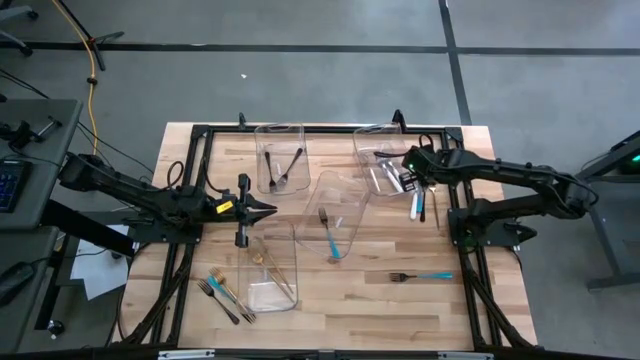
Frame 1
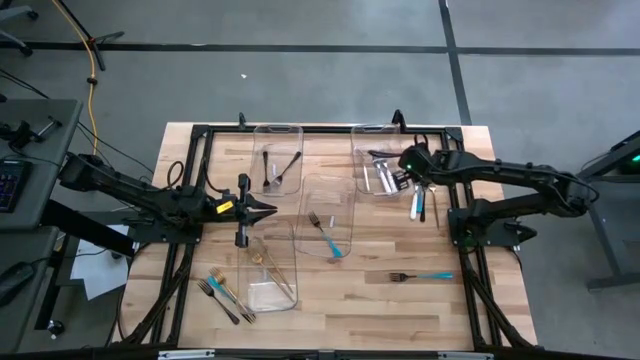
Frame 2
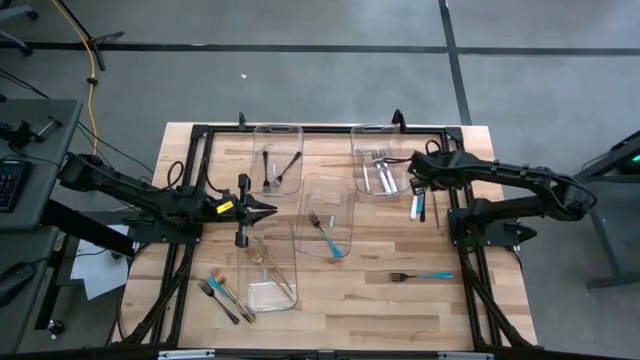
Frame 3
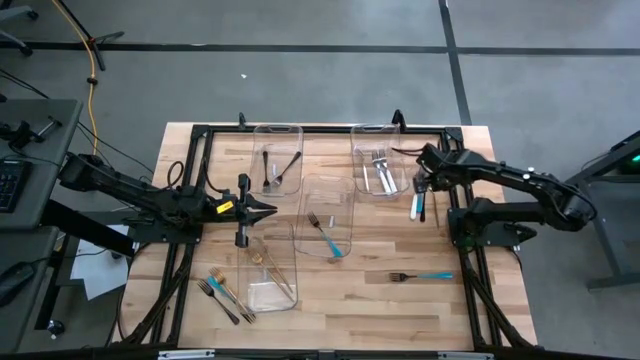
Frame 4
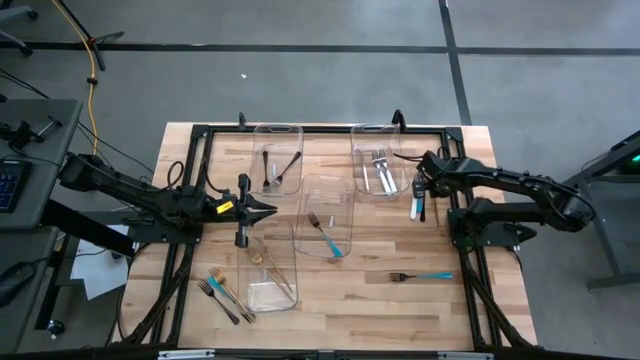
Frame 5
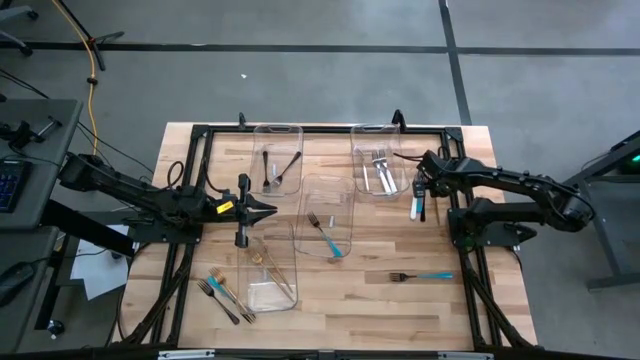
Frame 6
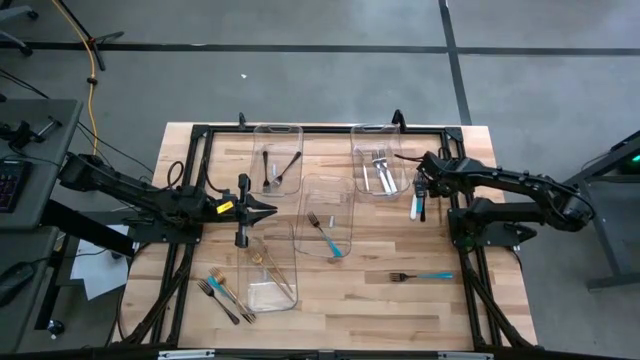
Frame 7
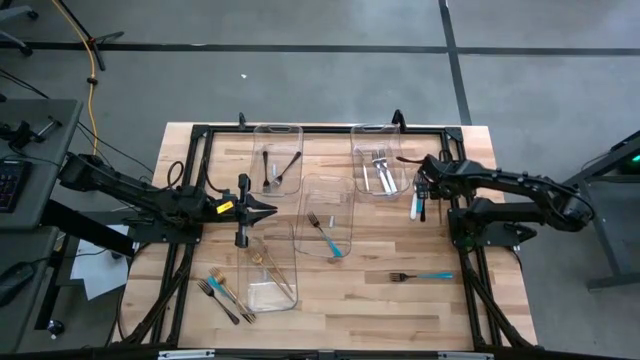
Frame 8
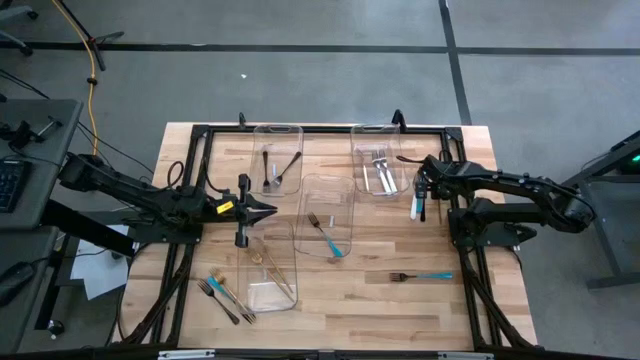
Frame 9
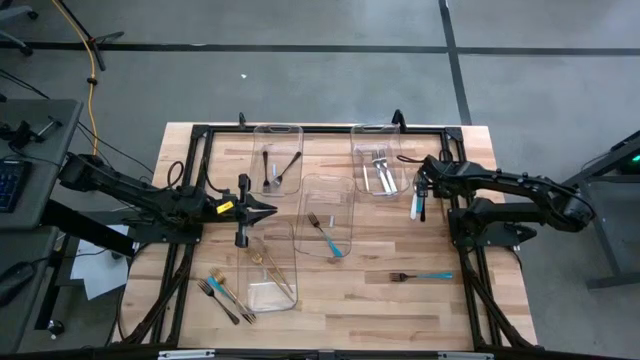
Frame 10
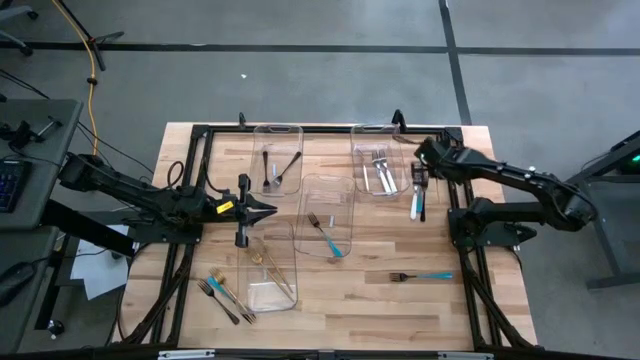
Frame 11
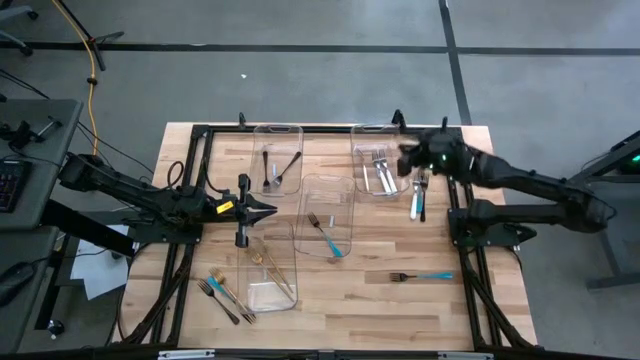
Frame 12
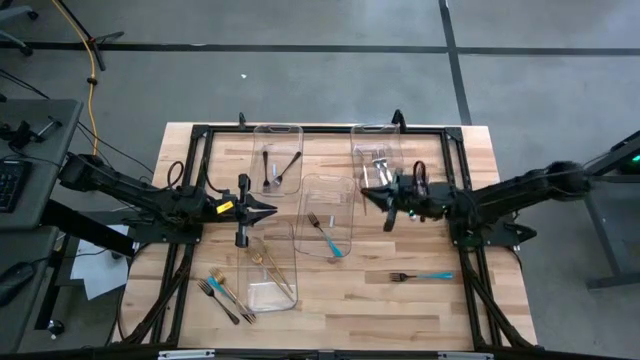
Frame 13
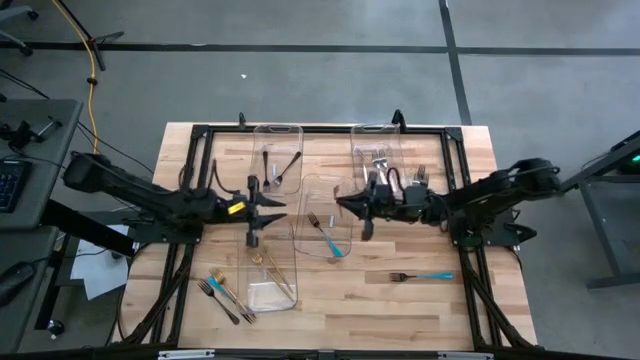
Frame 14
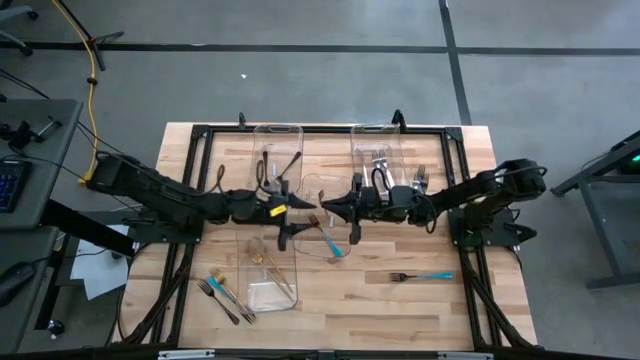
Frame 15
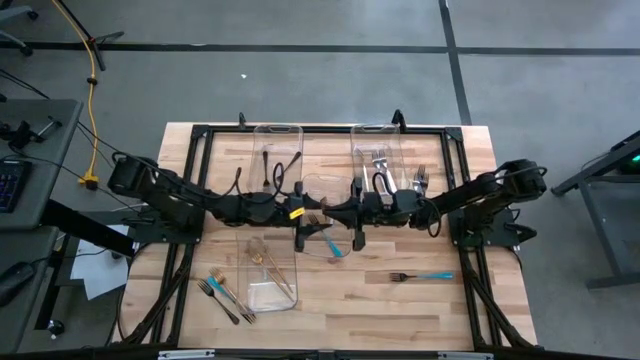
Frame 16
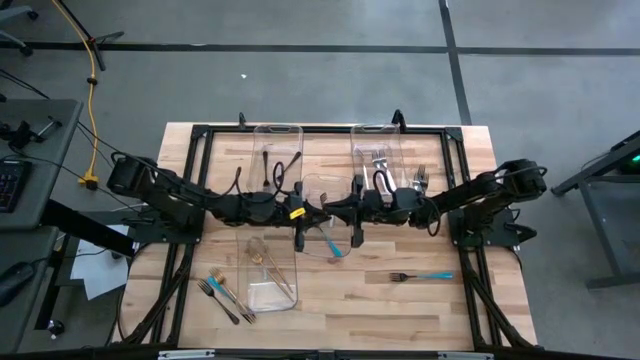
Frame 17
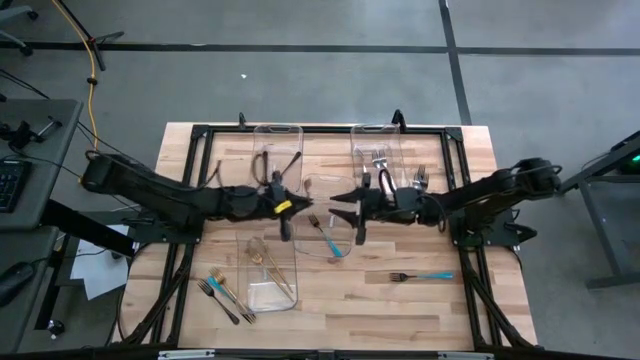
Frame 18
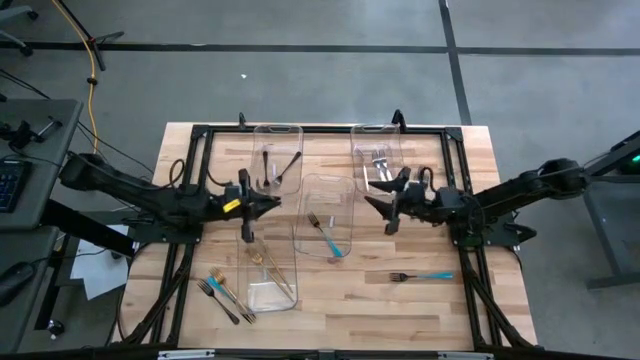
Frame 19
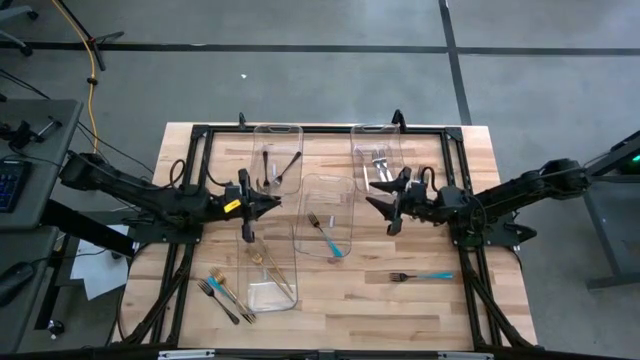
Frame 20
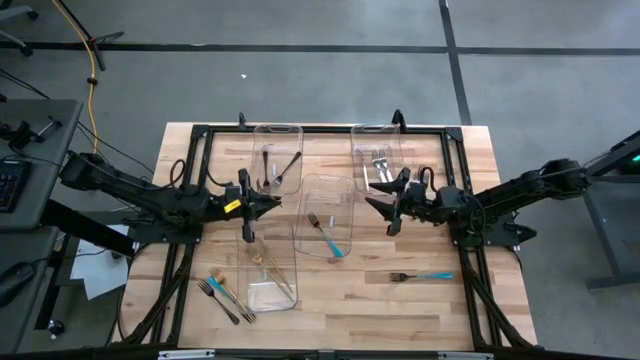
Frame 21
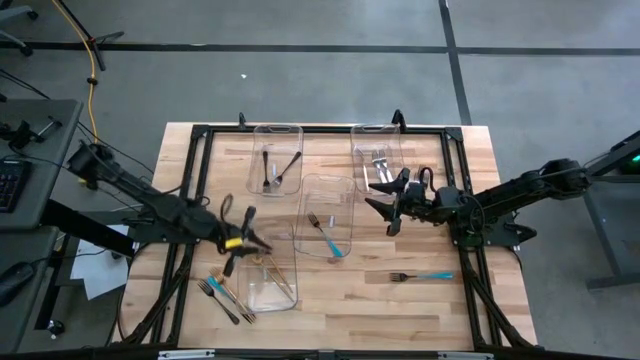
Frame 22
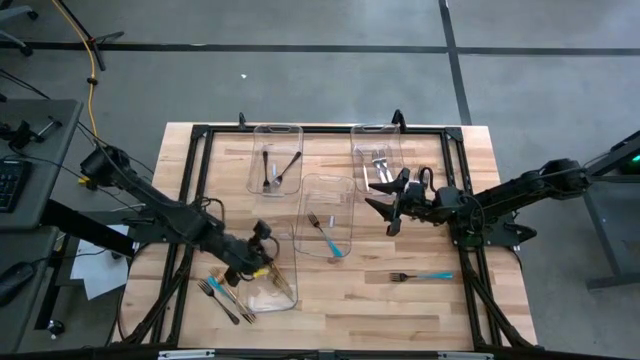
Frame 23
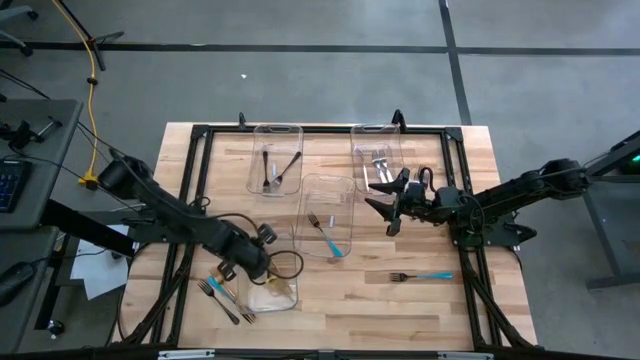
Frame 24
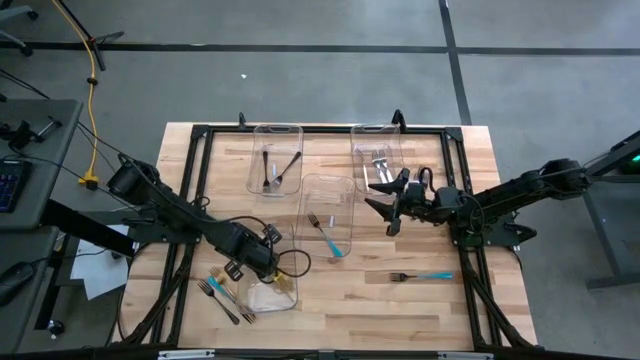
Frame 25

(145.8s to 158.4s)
Task: Sort silverware by color (type)
Put the gold fork into the bottom left transparent bin

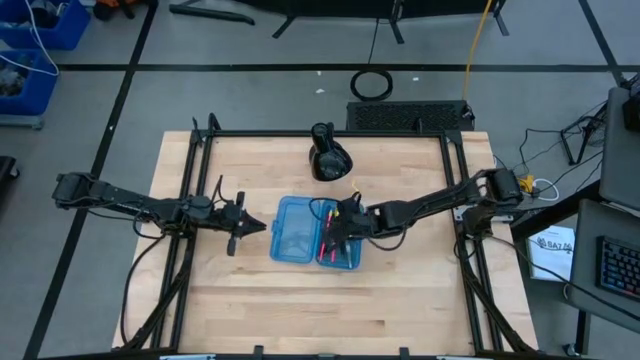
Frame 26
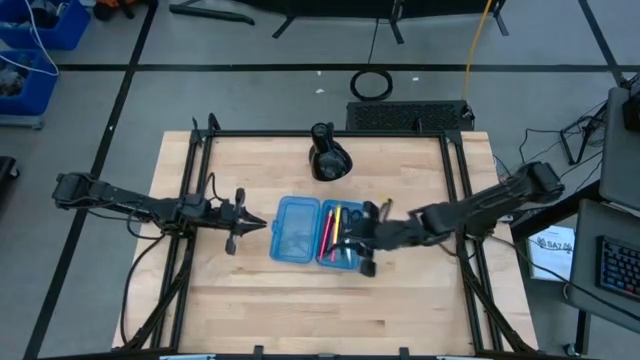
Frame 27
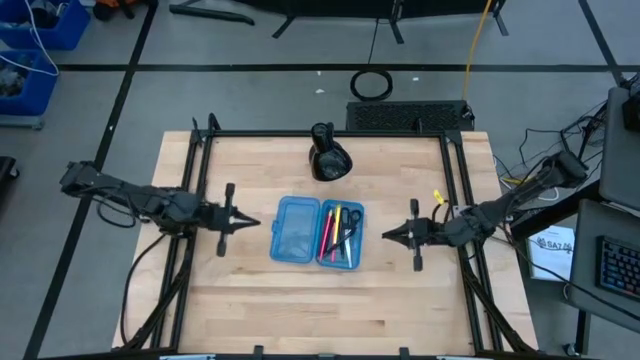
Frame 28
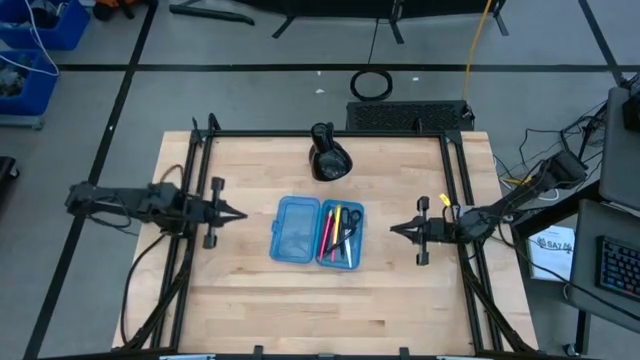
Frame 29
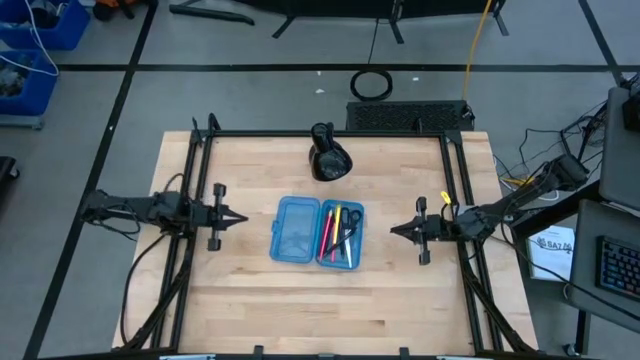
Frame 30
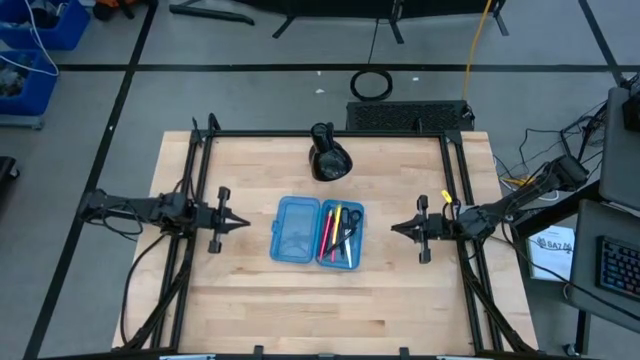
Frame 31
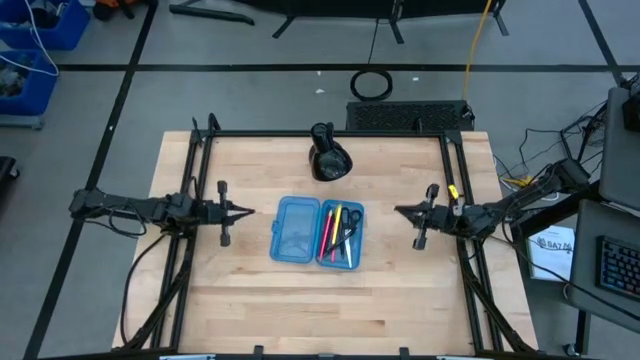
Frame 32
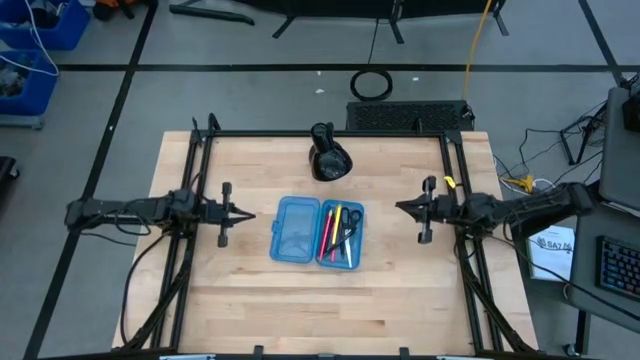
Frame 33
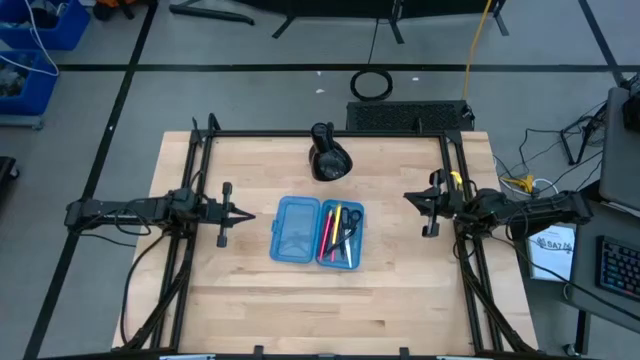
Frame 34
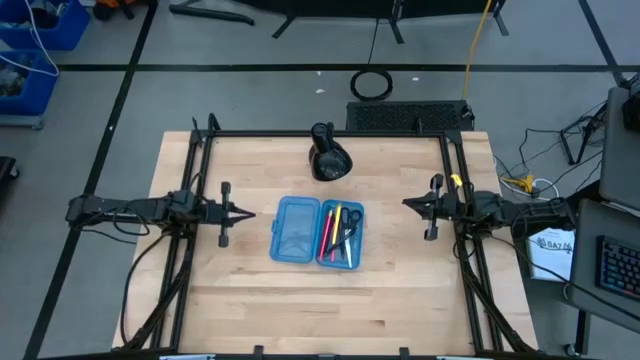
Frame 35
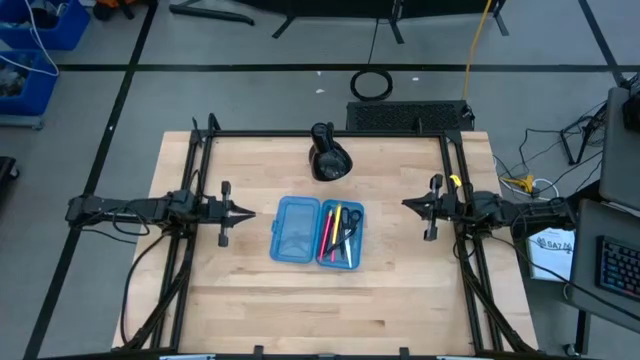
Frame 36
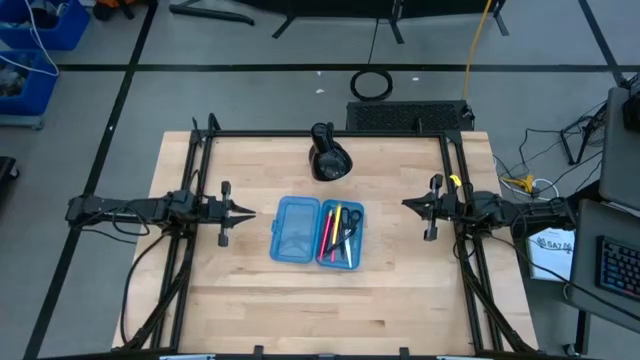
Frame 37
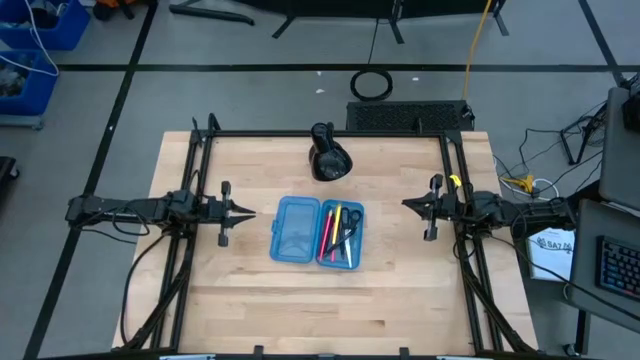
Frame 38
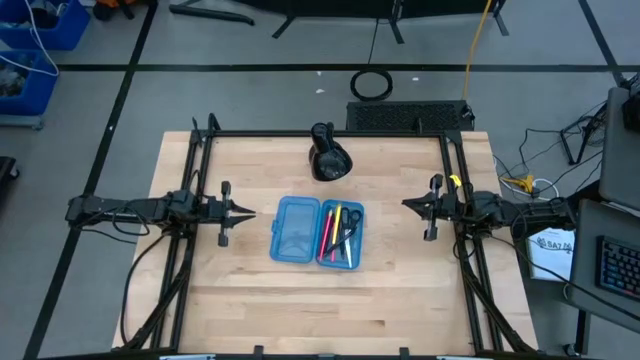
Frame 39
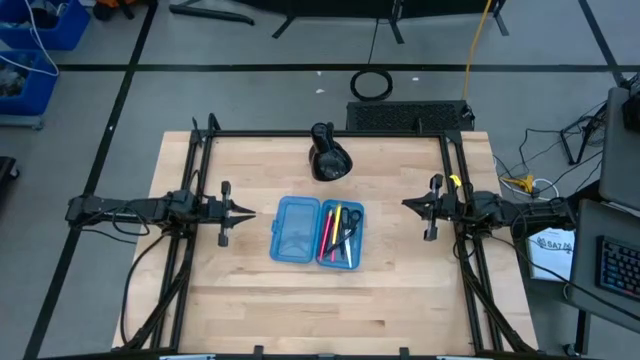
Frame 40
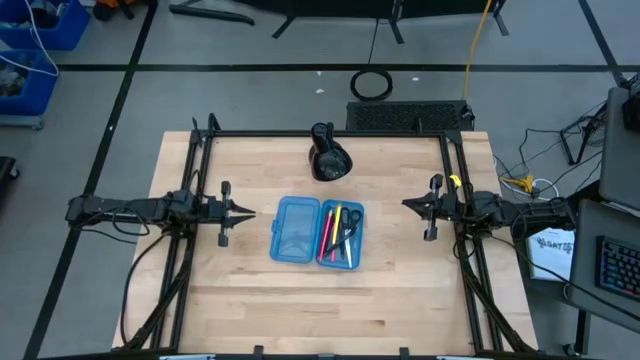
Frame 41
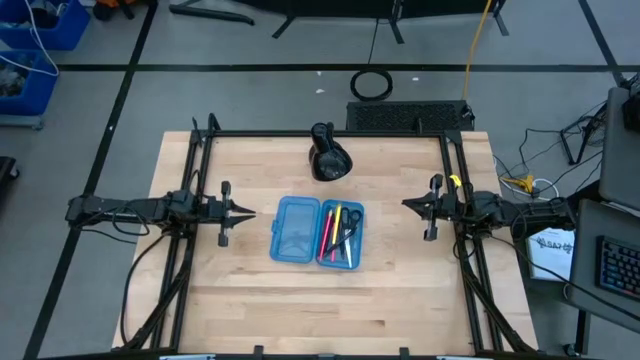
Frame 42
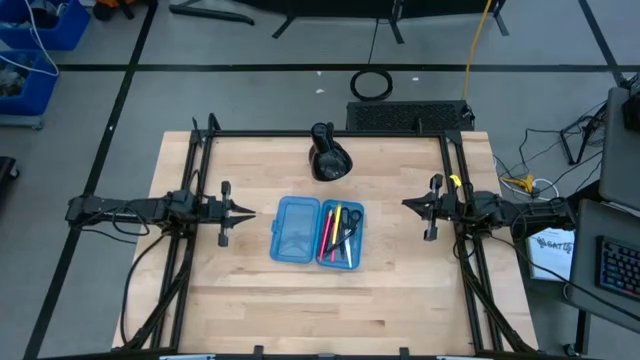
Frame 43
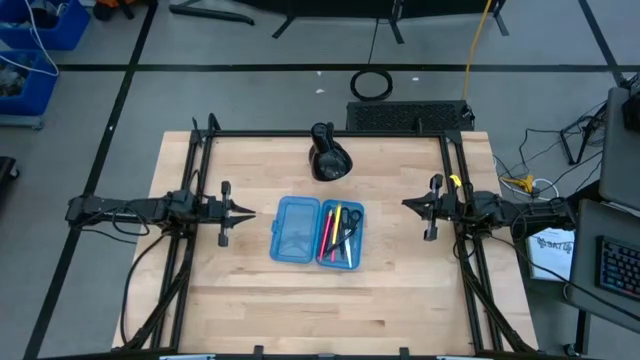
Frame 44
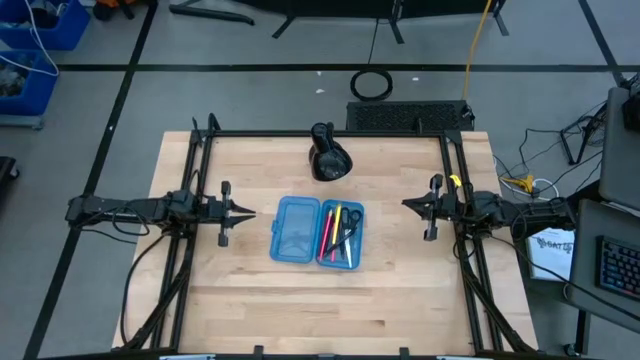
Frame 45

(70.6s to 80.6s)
Task: Pick & place school supplies into a supply box
Return to Home Position
